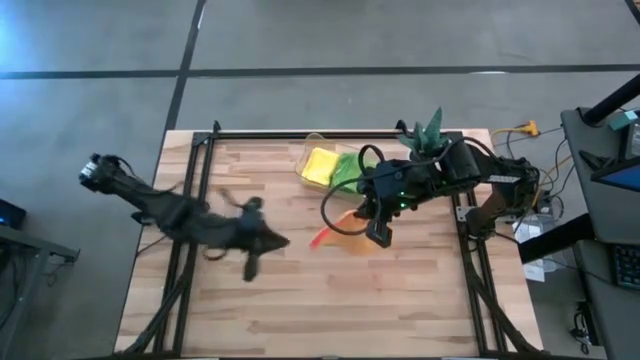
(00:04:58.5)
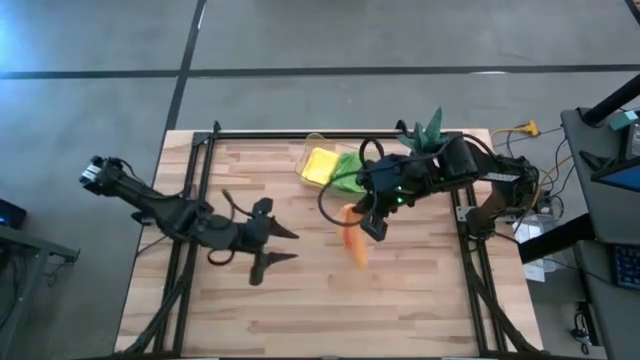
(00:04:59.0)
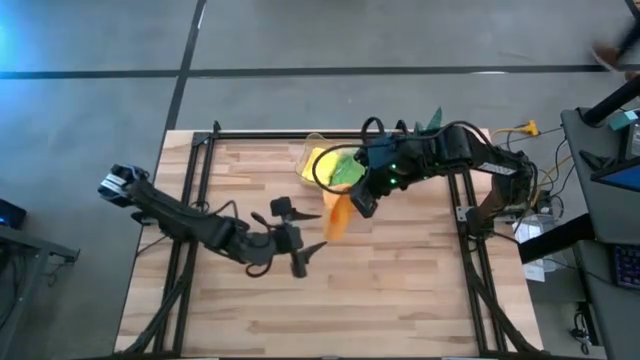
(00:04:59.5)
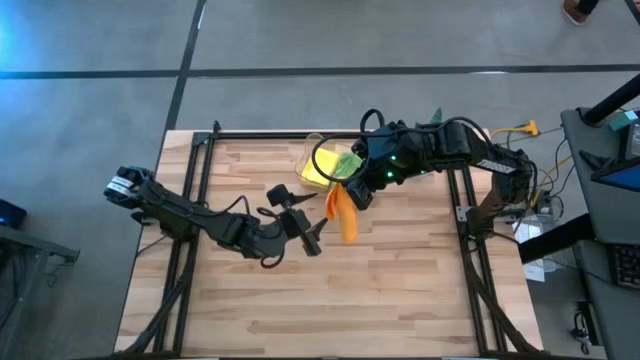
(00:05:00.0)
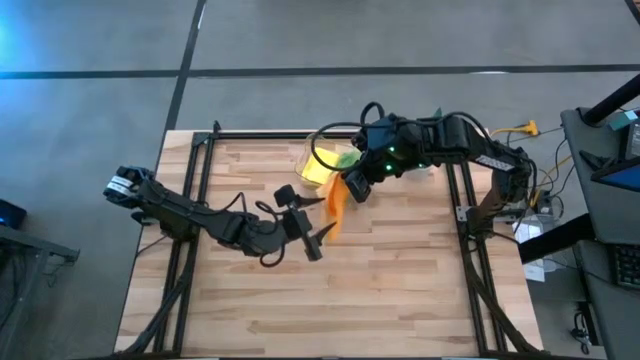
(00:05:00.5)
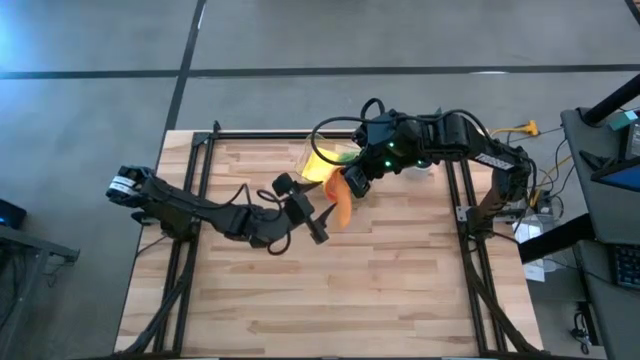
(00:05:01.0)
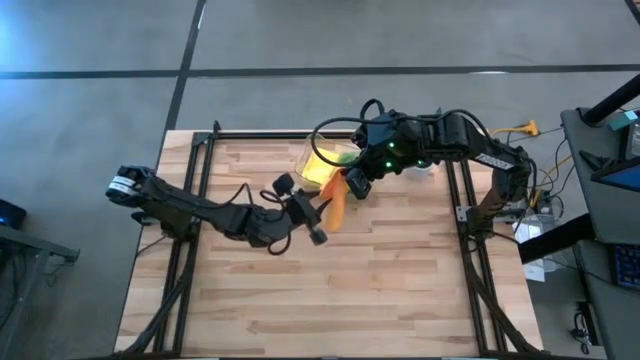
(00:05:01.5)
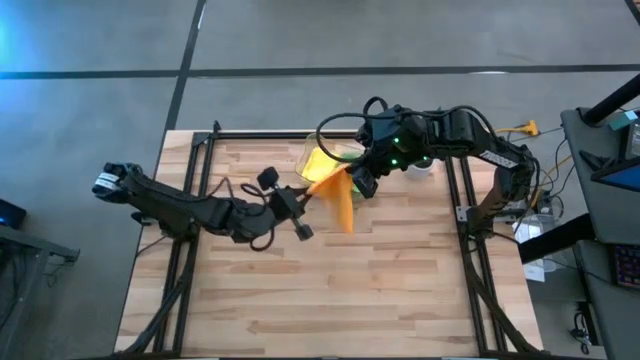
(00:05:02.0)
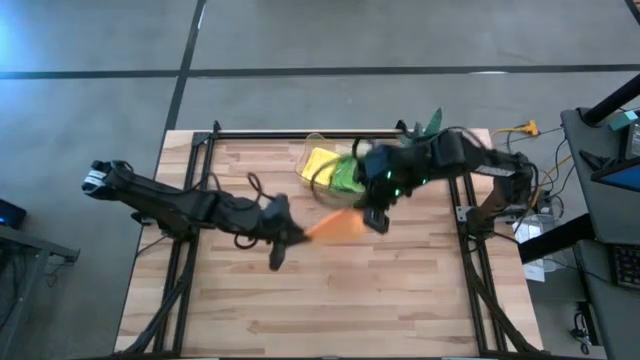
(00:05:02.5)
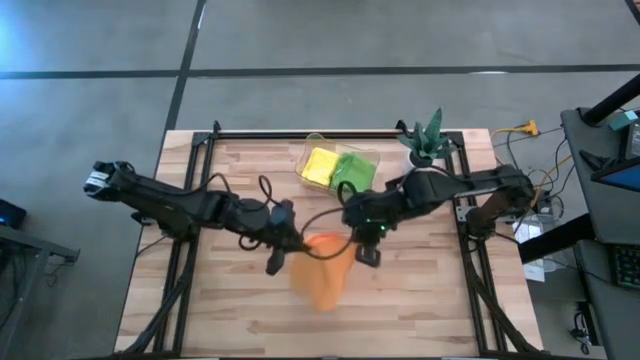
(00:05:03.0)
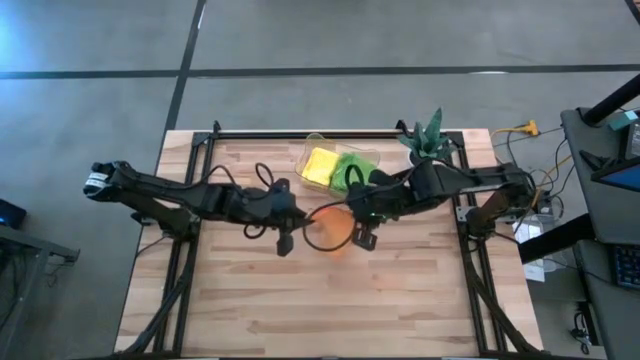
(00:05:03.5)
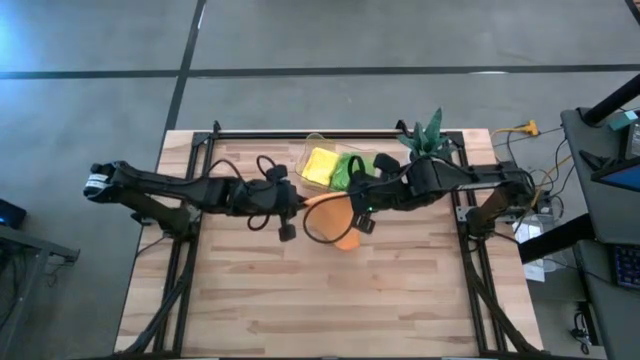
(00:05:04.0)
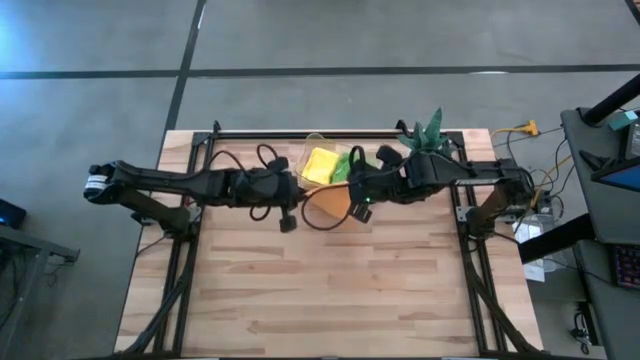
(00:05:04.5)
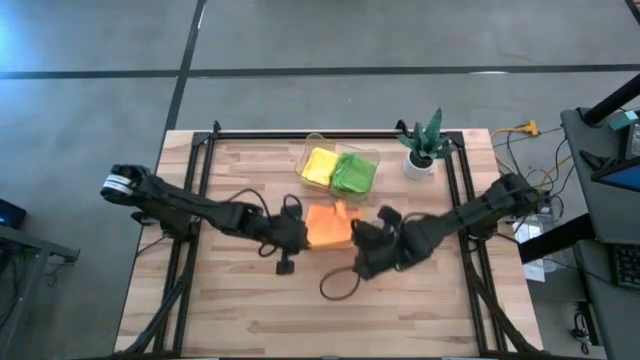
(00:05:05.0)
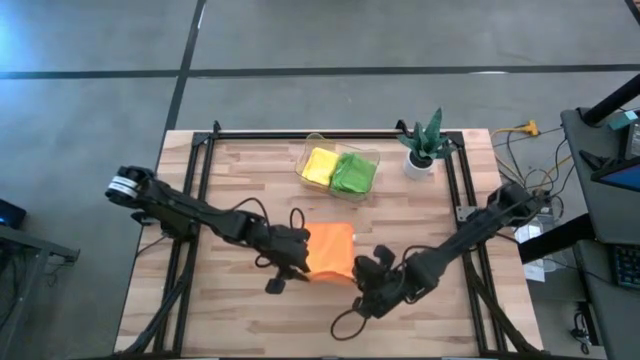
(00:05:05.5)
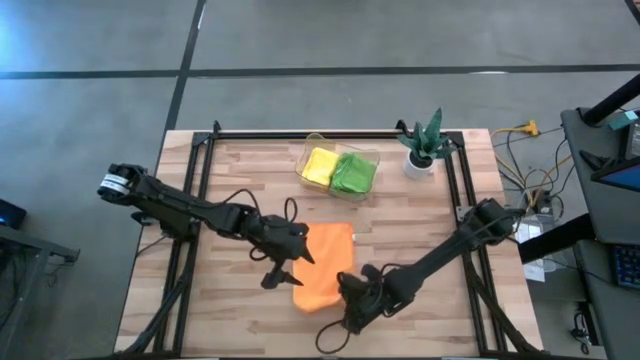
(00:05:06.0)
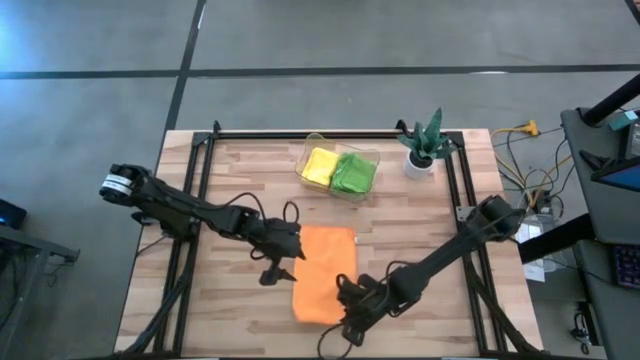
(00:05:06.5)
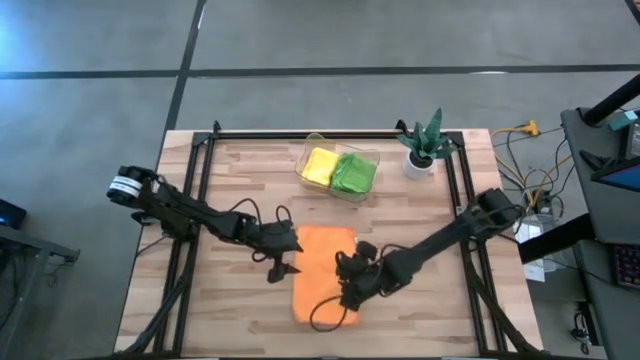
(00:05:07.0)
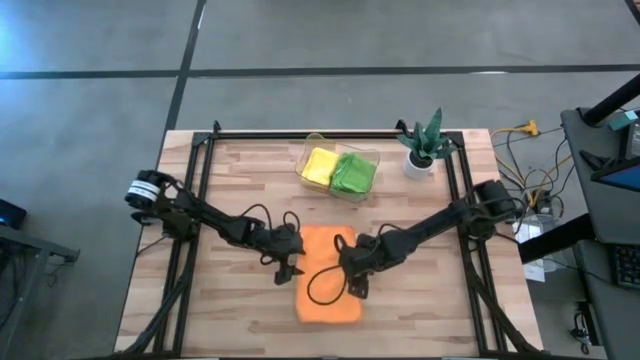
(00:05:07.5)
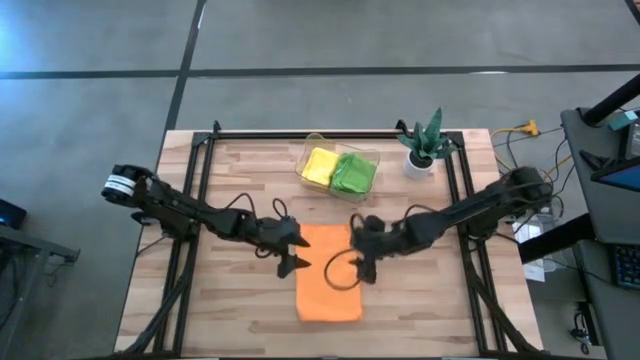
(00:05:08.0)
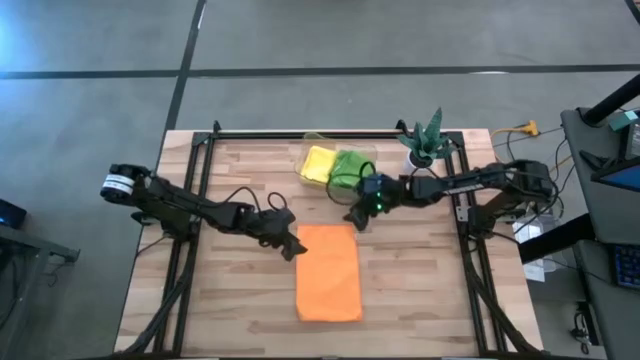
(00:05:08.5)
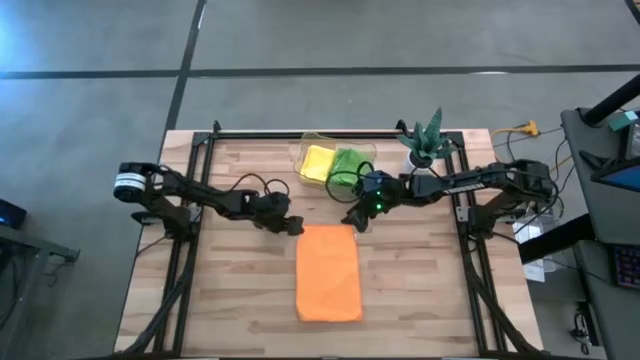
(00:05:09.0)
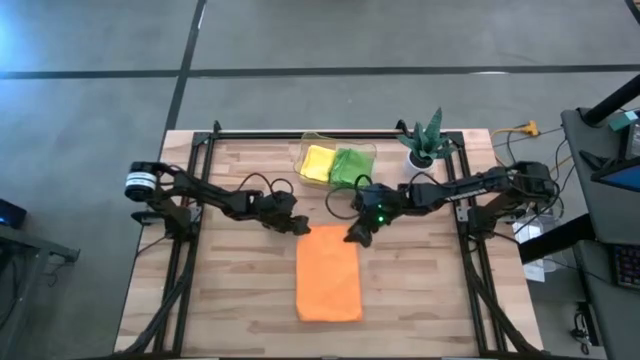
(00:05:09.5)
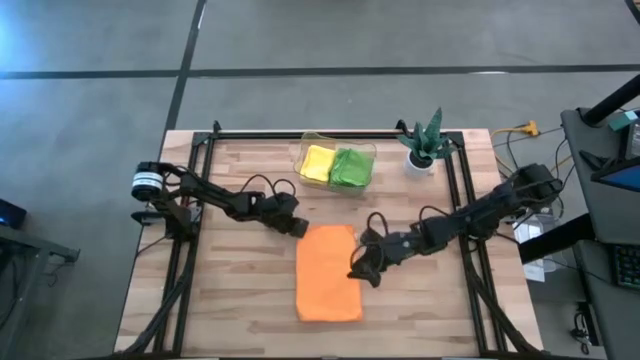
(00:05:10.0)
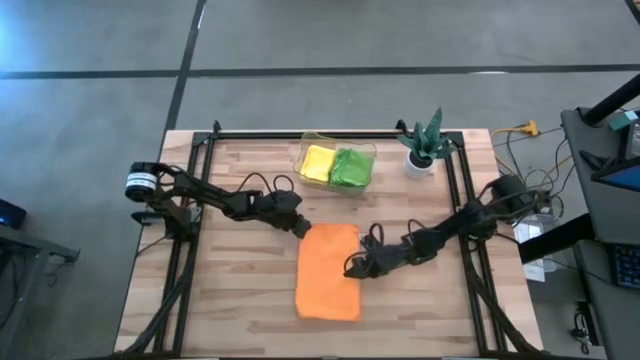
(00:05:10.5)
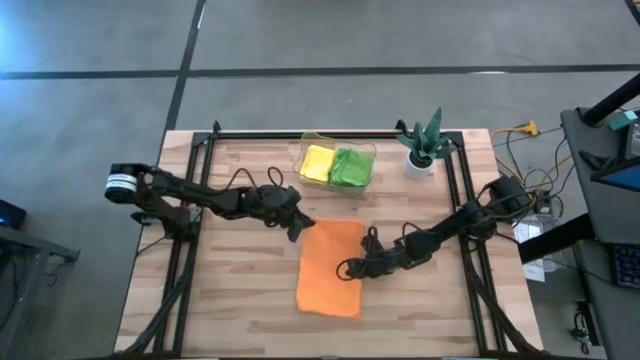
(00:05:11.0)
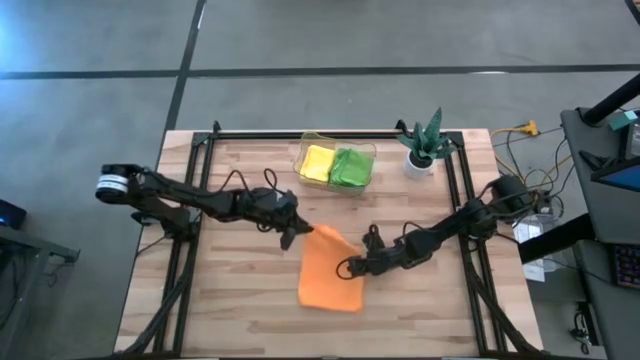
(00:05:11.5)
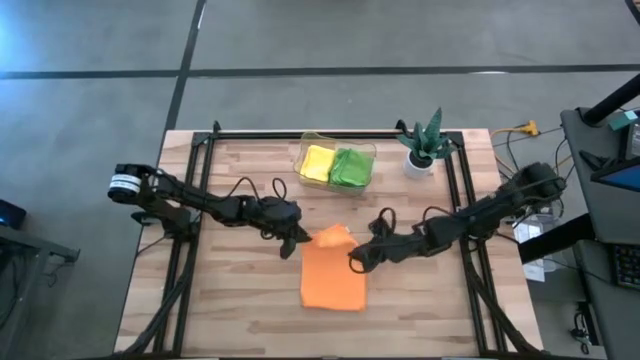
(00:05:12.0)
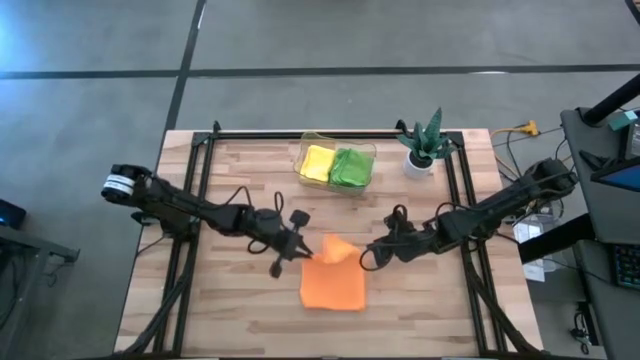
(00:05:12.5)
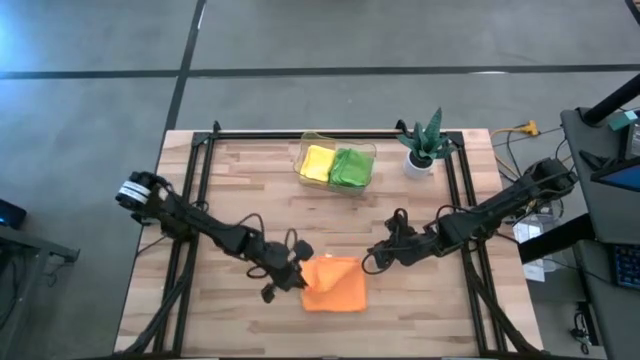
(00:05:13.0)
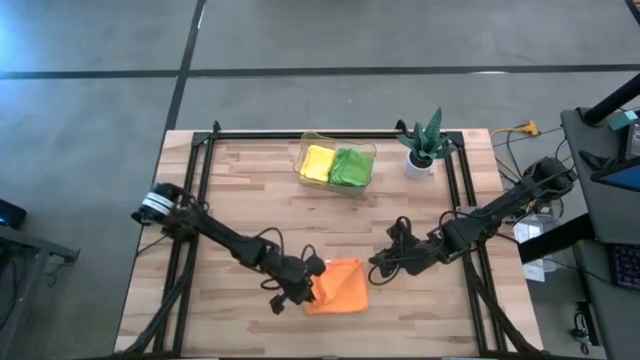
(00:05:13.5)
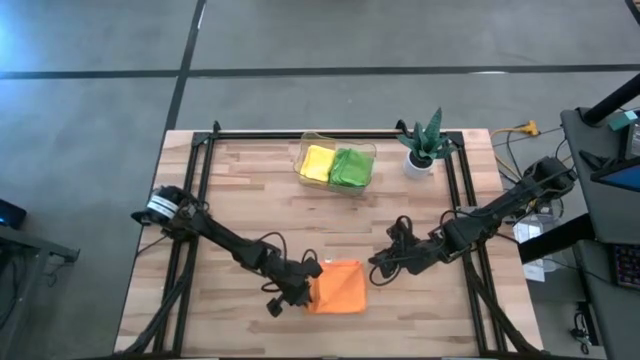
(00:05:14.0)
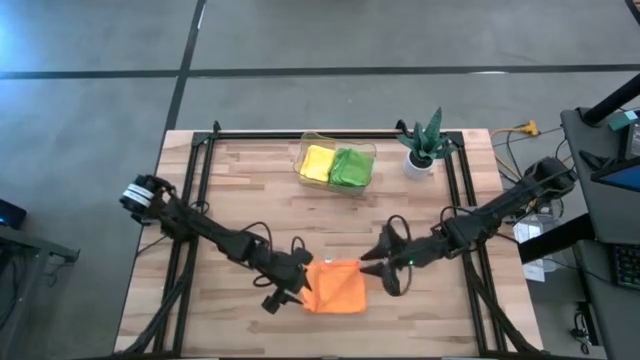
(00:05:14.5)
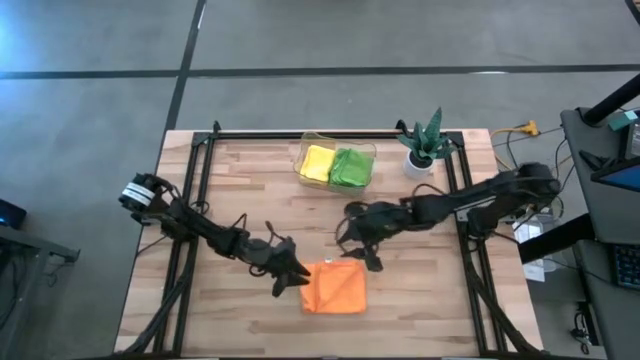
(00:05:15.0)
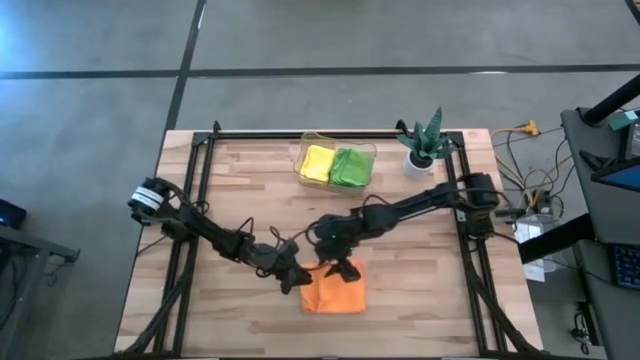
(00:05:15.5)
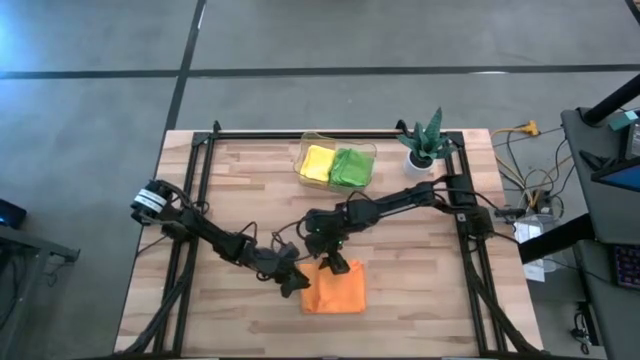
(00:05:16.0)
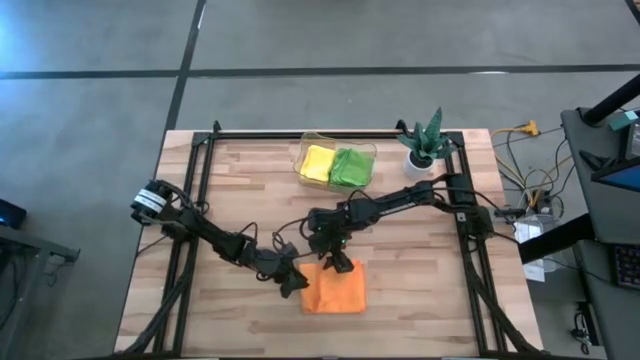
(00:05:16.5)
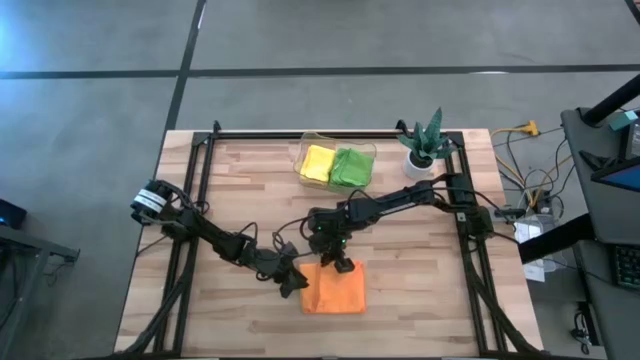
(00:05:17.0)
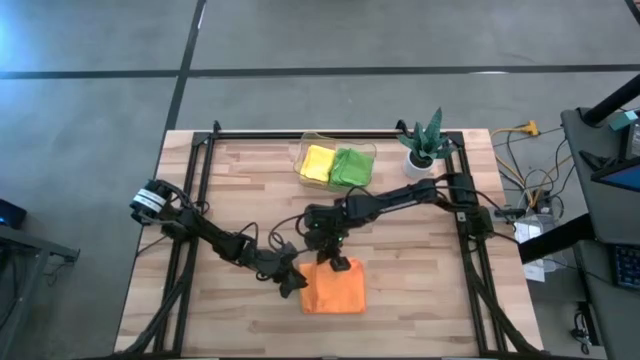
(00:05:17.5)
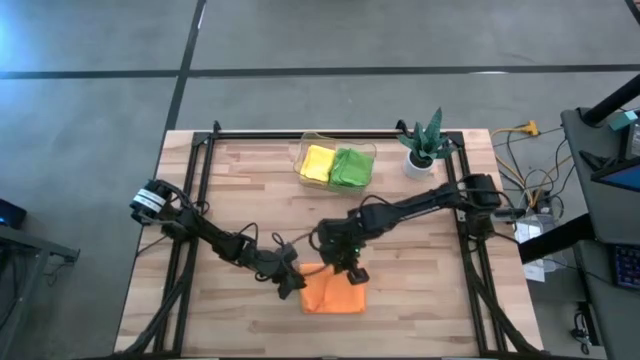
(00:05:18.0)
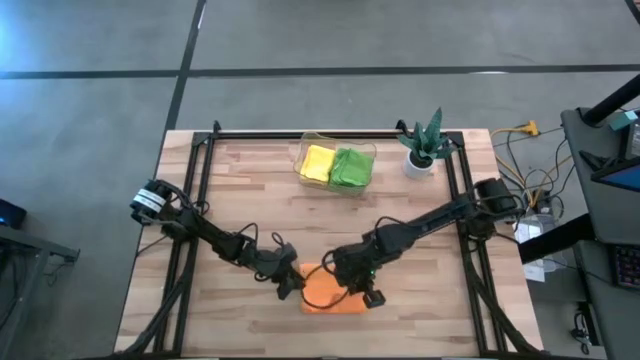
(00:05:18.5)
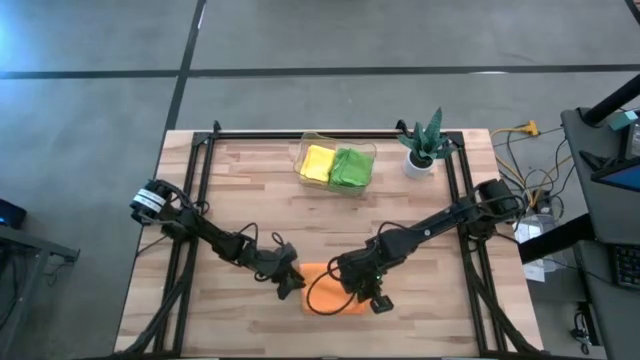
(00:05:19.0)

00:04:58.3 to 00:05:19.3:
Task: Fold microfiber towels
Fold the orange microfiber towel

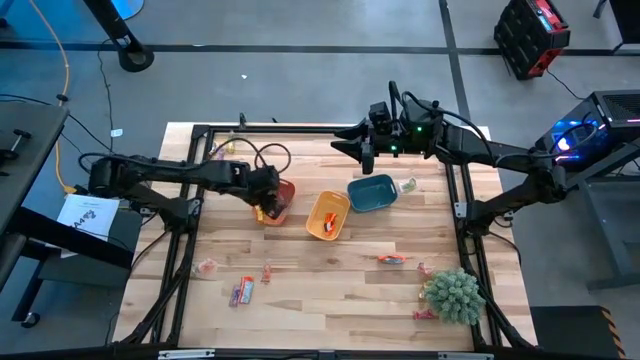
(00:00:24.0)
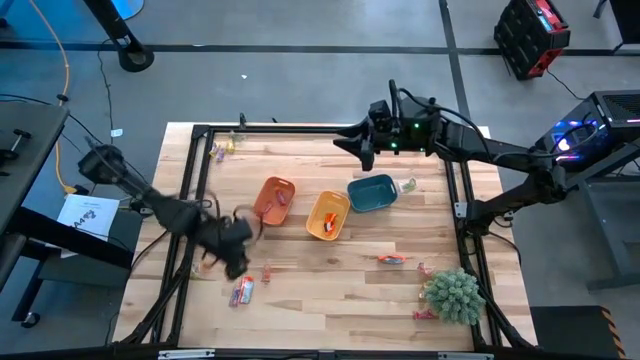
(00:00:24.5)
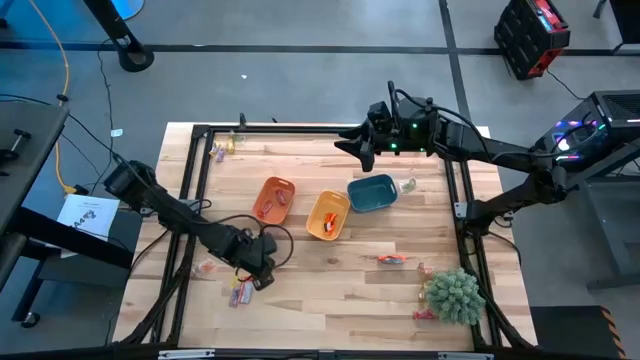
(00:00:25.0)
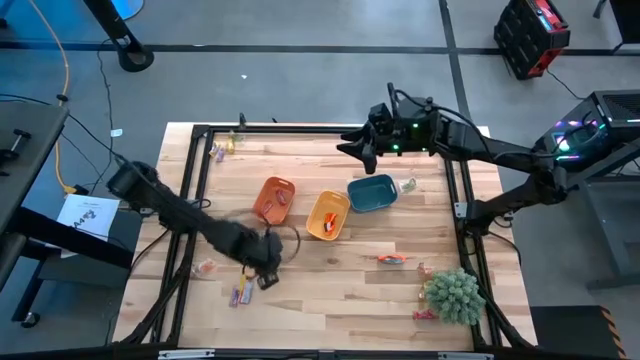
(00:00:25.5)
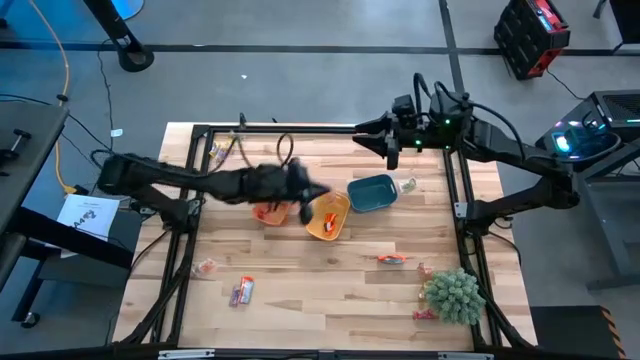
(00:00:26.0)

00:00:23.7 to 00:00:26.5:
Task: Sort candy
Put the orange gummy into the blue bin
